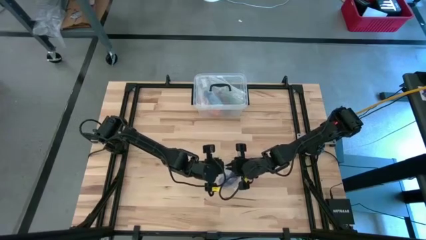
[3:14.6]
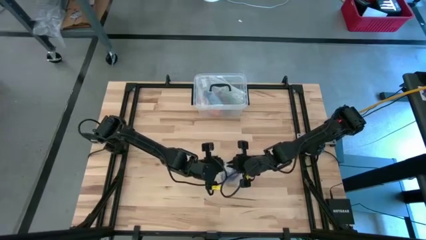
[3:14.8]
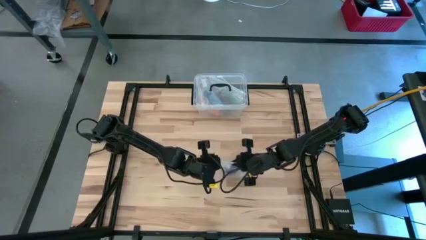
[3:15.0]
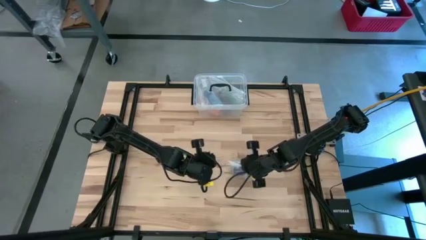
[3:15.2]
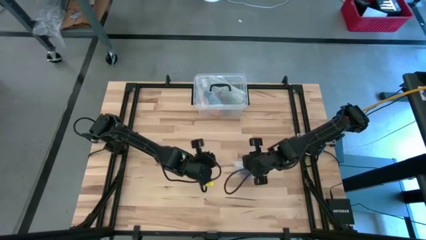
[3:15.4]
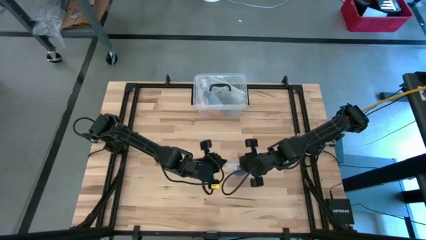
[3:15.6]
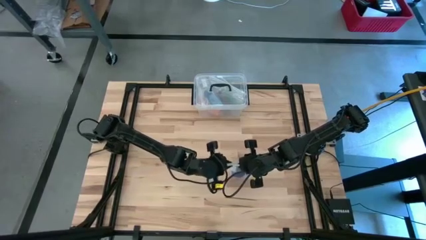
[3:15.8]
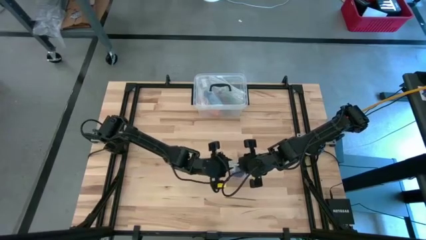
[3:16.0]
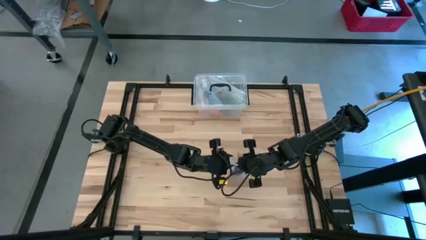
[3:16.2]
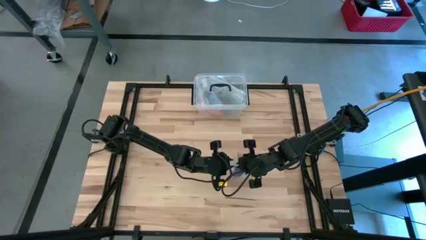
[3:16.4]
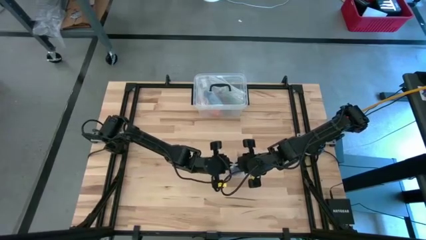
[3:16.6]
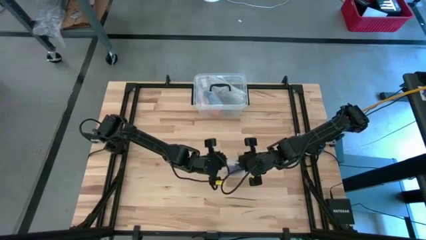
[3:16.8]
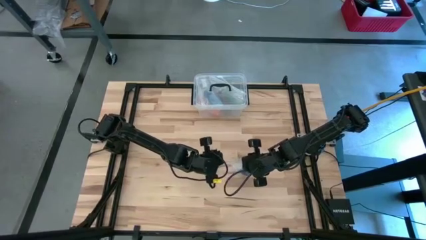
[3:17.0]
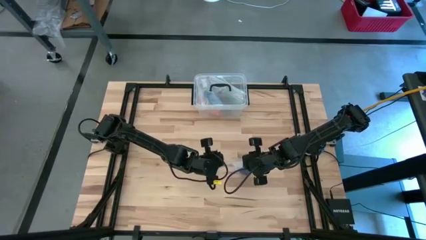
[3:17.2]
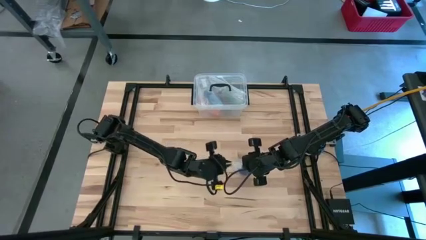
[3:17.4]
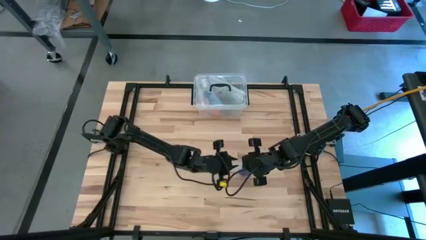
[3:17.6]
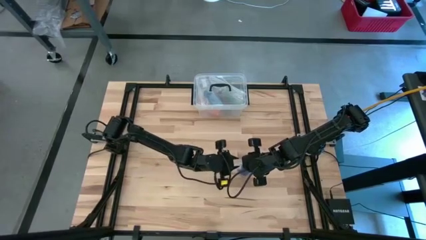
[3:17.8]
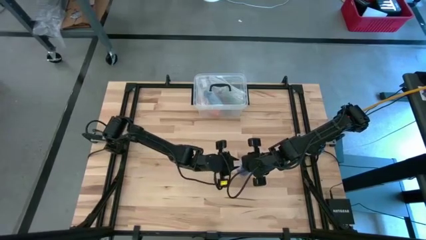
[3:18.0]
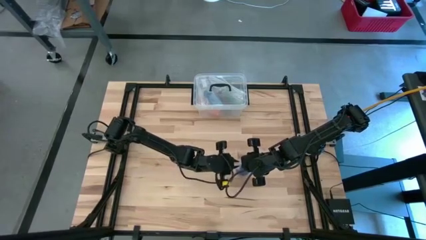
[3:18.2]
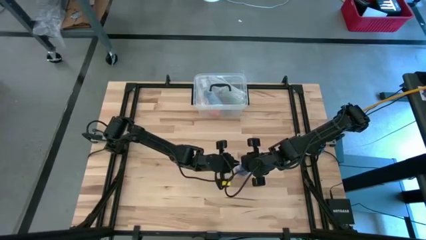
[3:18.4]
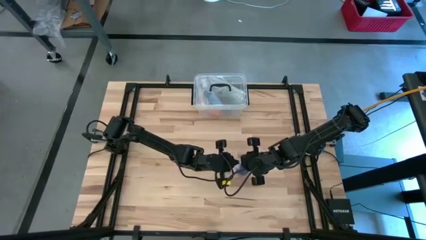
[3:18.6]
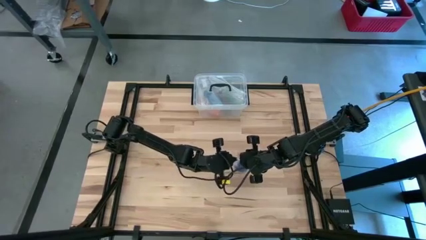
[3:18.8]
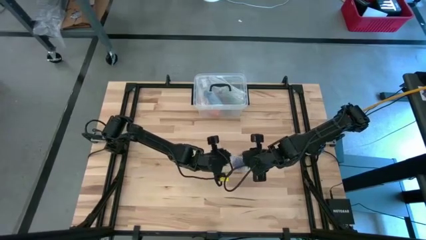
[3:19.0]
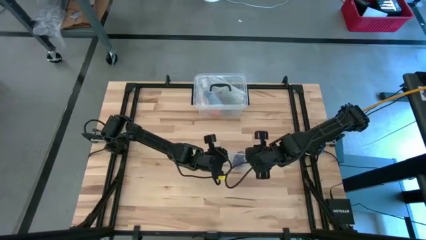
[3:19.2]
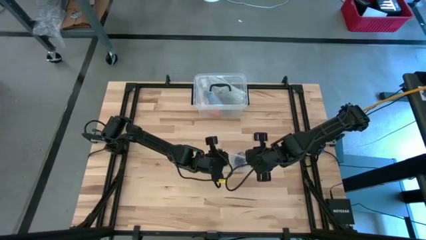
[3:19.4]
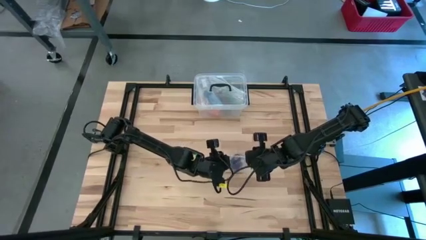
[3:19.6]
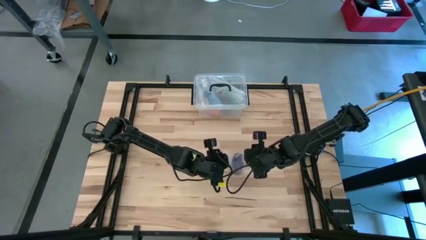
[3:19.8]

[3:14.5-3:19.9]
Task: Roll bandage
Close the transparent zip bag

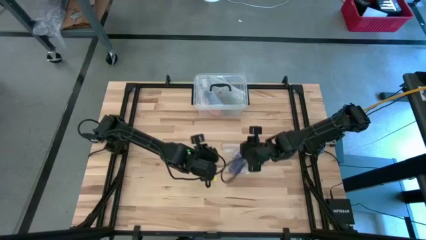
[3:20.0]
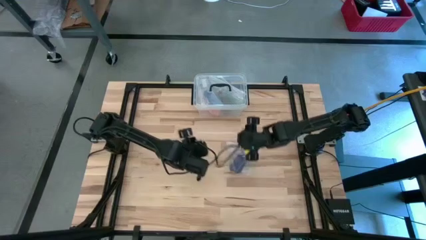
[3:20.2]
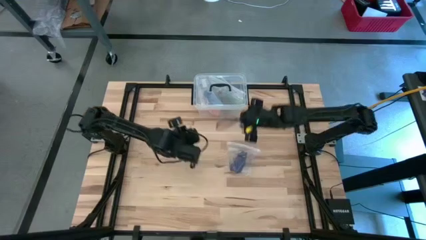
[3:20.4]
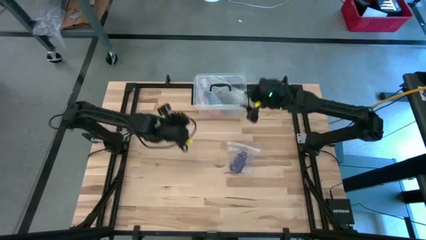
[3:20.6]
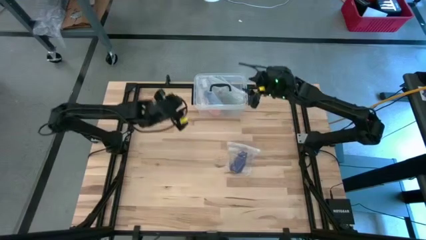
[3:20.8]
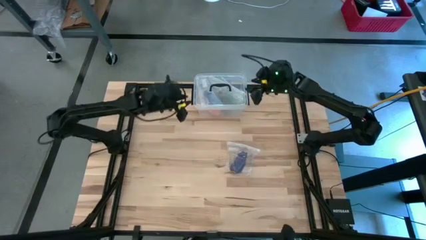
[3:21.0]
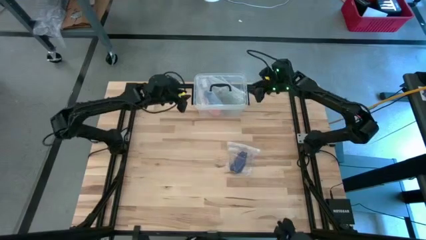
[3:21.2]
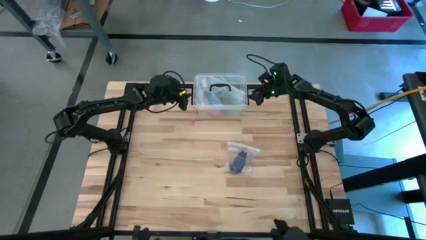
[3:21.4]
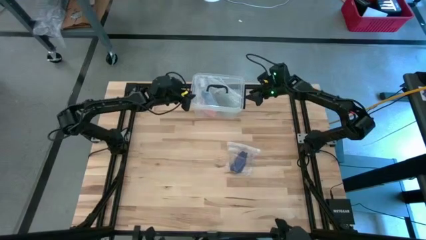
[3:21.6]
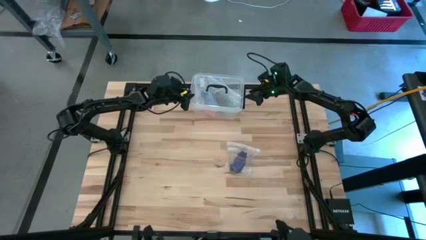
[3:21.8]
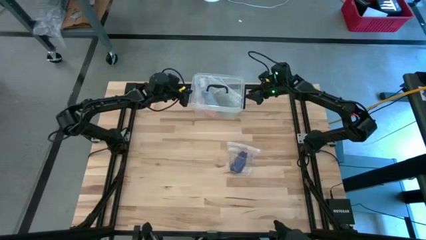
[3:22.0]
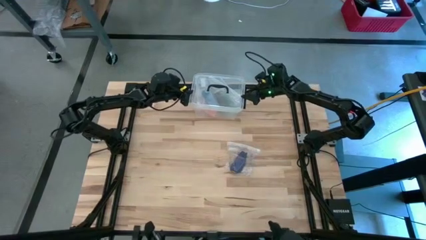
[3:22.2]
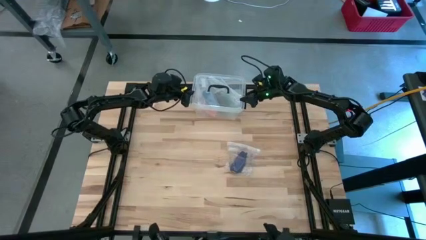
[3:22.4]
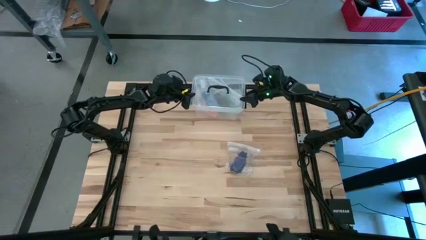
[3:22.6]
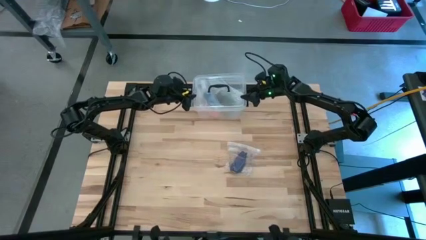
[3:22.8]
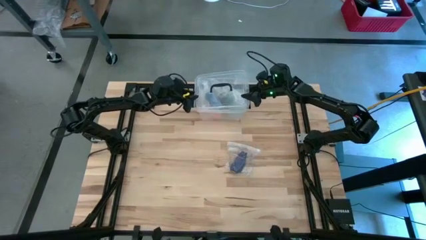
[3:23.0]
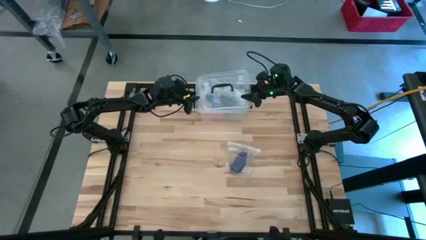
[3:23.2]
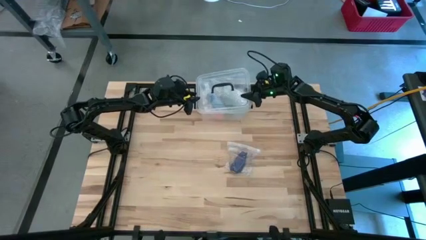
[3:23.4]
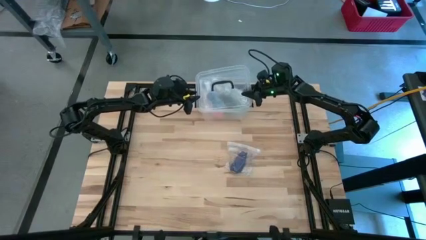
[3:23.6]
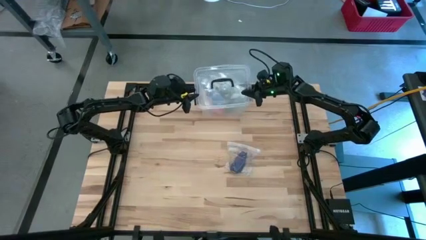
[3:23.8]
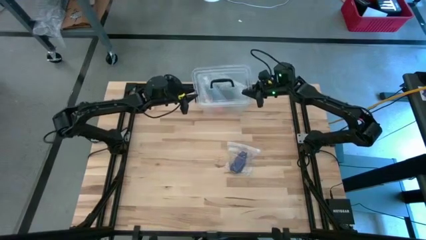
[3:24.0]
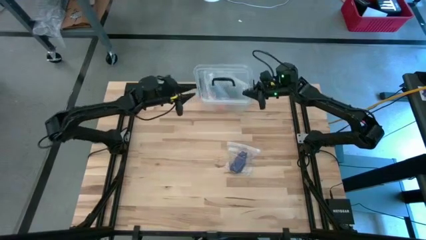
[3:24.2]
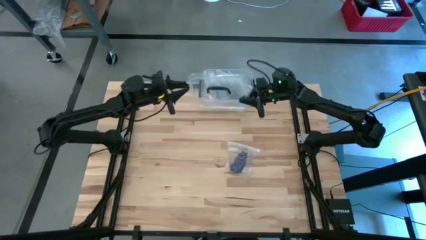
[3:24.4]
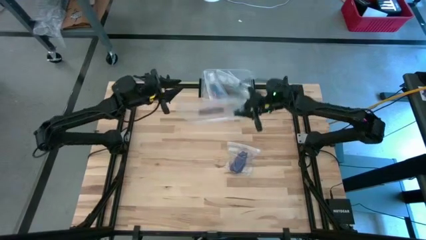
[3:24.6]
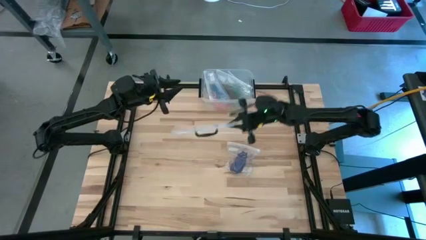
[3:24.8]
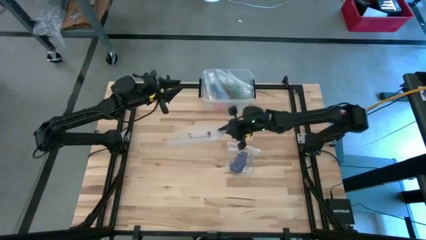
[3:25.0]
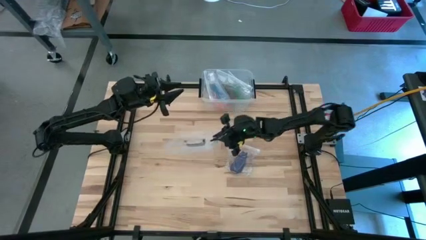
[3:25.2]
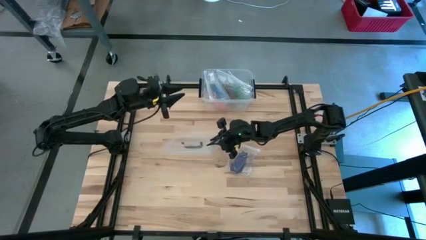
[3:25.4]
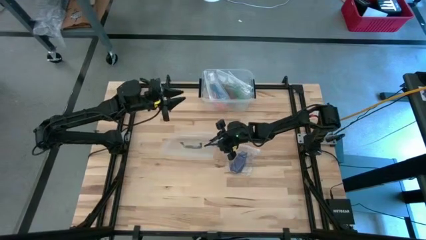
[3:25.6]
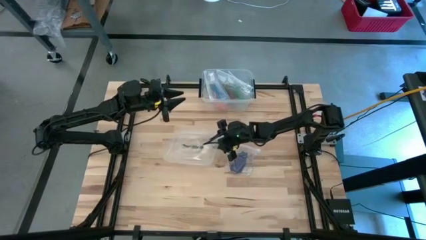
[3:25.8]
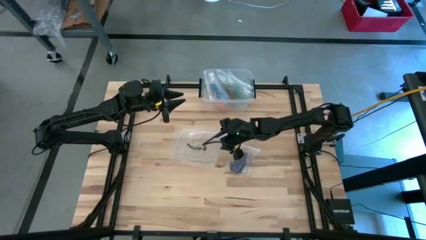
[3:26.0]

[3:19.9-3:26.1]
Open the transparent bin

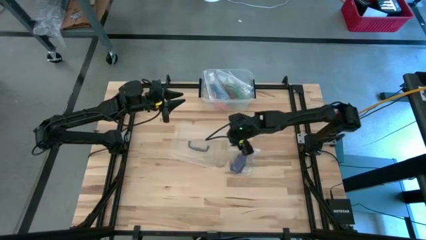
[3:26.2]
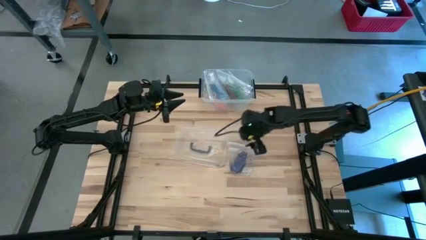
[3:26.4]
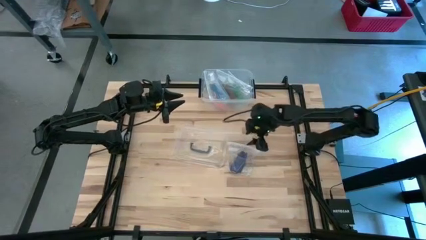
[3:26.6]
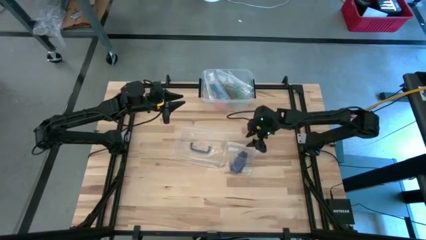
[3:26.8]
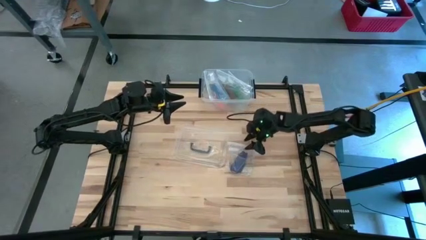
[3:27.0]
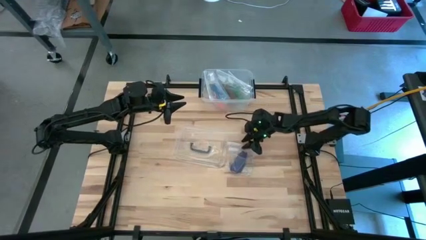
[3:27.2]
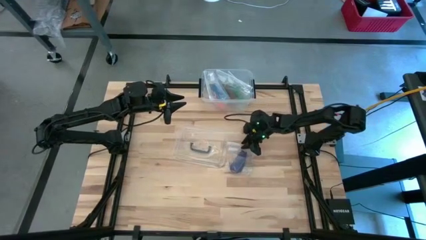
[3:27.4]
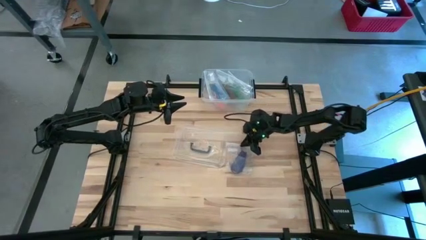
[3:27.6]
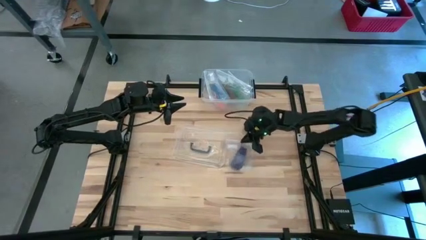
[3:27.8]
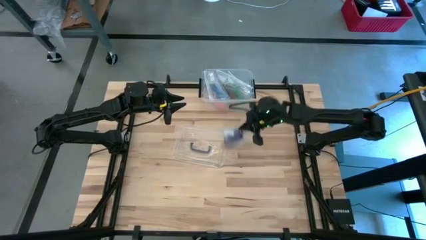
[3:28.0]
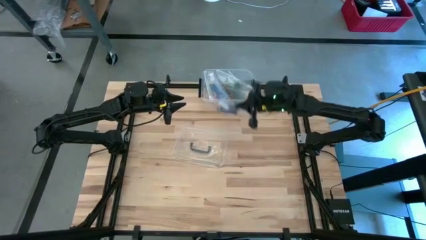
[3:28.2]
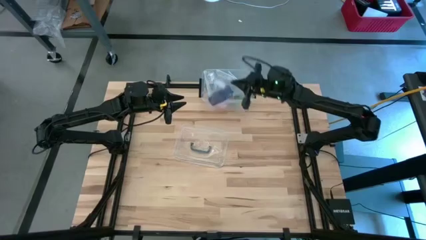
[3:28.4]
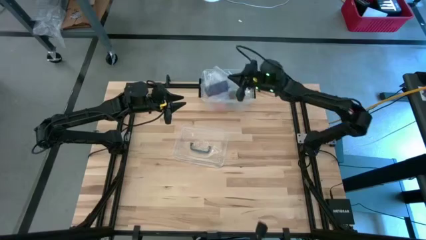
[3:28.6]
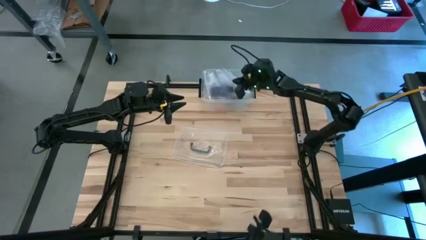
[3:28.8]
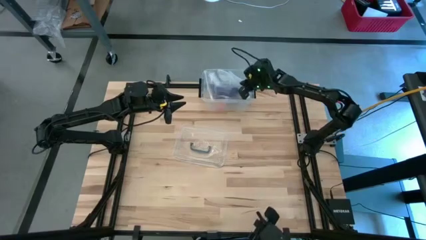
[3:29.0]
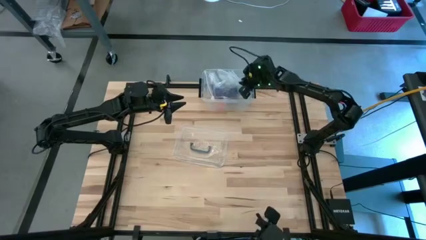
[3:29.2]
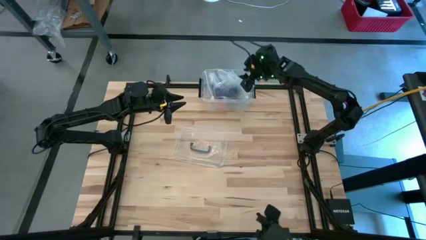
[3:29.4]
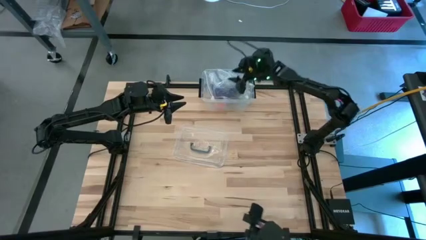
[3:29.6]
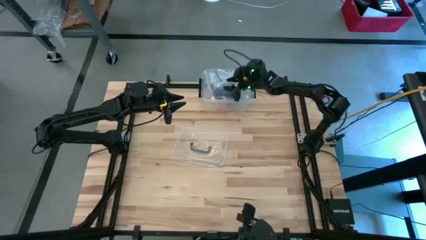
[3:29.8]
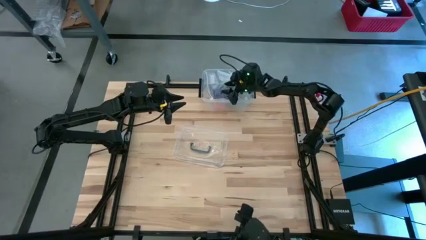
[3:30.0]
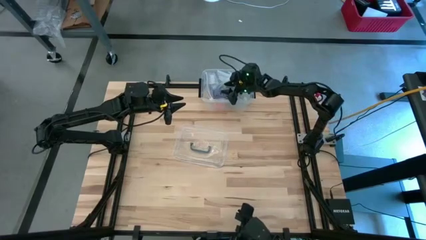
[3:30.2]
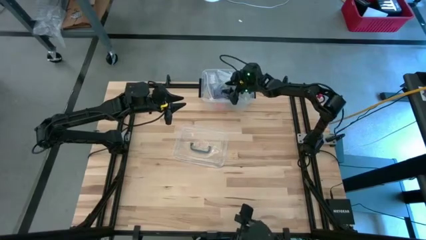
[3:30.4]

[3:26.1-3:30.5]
Put the transparent zip bag into the transparent bin

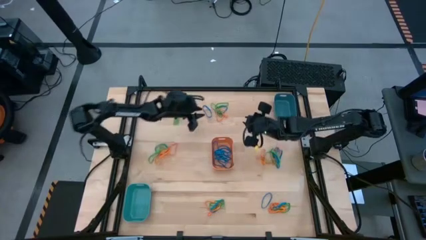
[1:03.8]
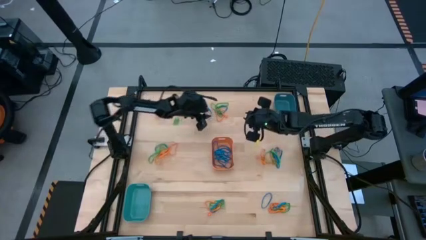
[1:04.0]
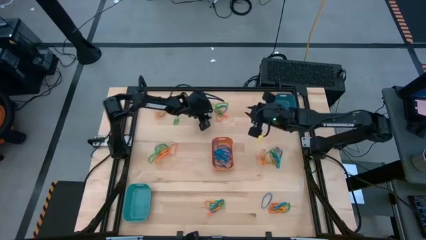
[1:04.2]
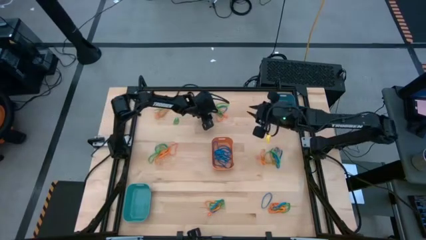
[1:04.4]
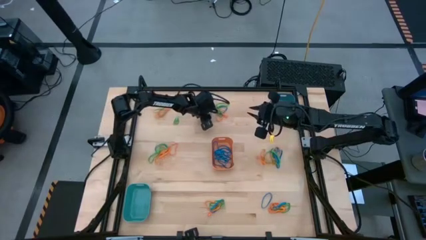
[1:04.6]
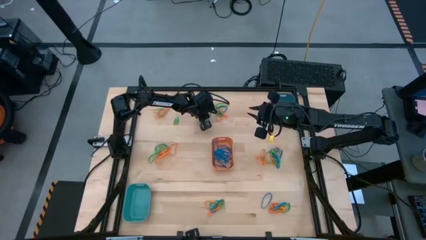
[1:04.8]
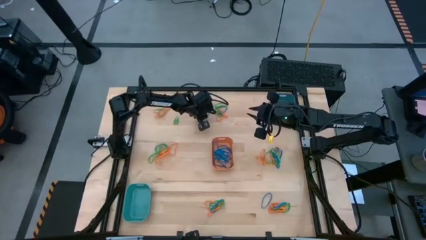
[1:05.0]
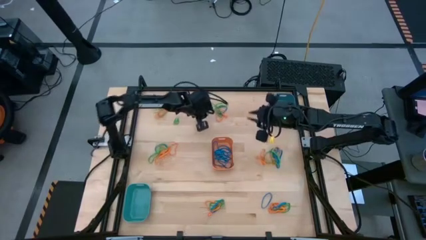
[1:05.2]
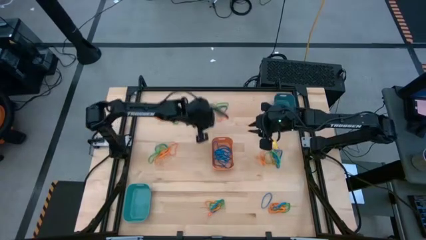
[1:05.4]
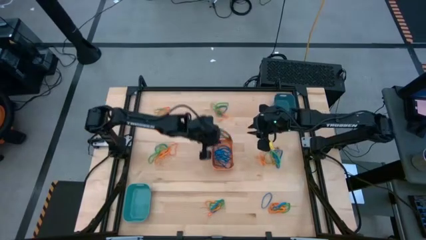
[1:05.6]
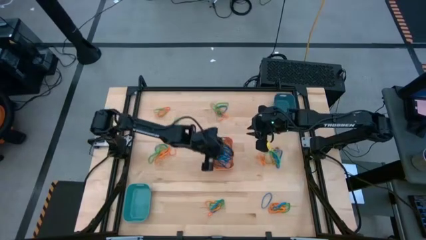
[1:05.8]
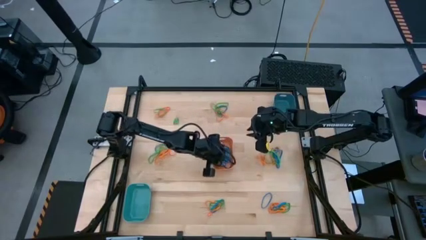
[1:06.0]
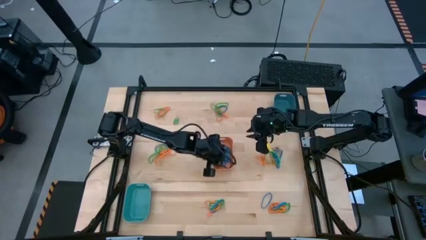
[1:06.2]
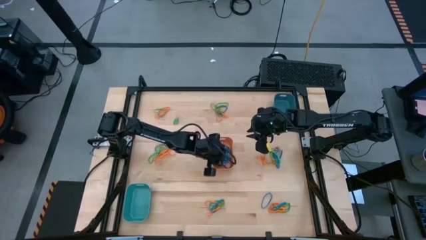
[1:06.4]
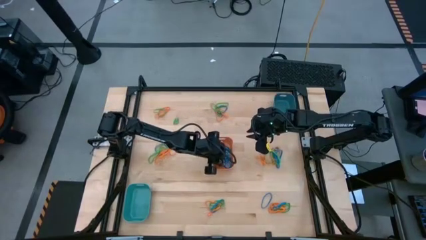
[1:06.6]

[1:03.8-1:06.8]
Task: Sort rubber bands into baskets
Put the blue rubber band into the orange bin
